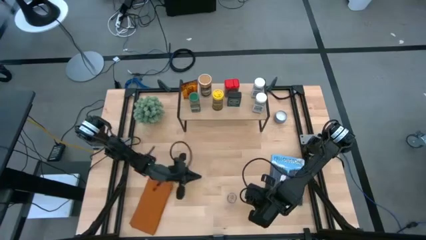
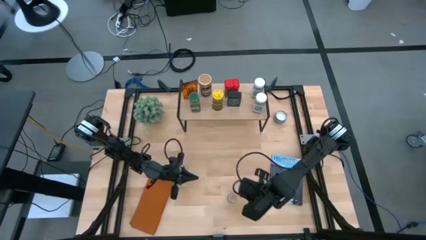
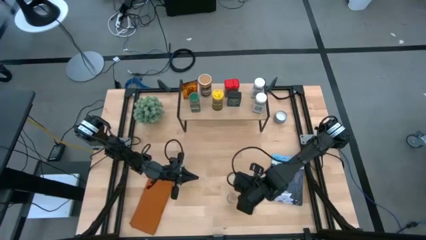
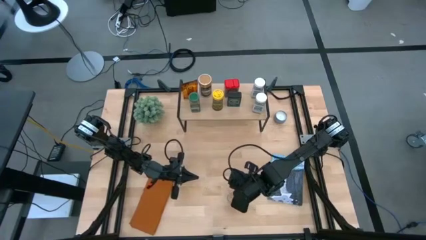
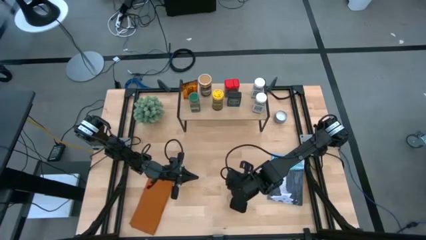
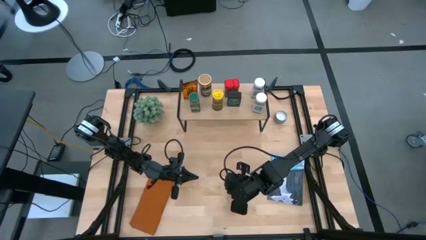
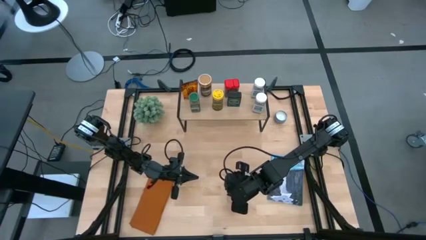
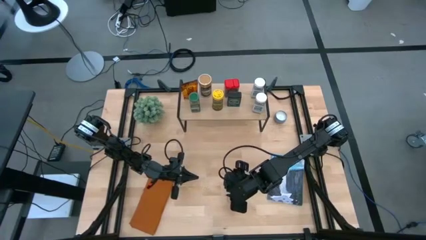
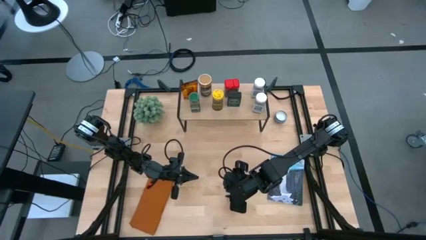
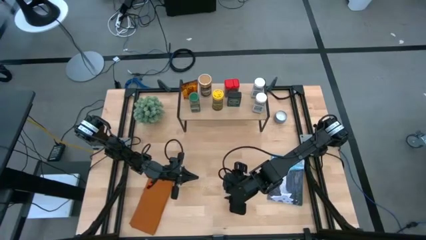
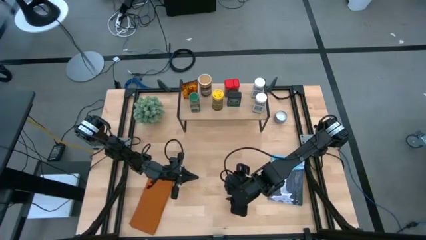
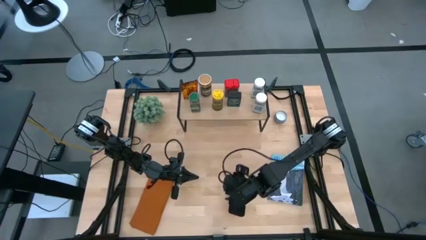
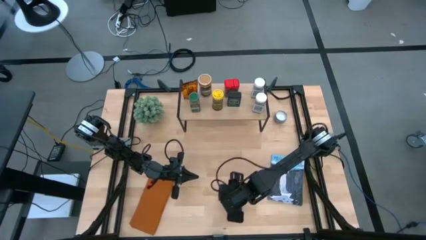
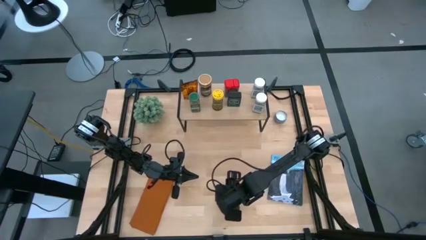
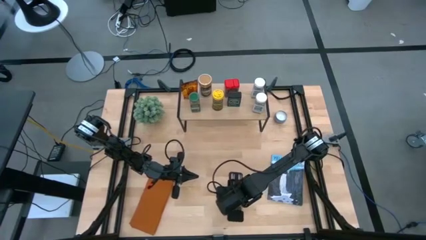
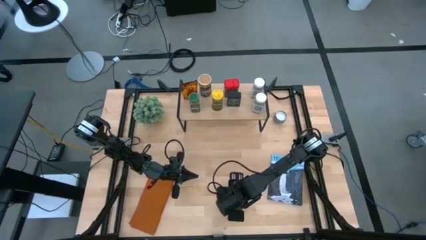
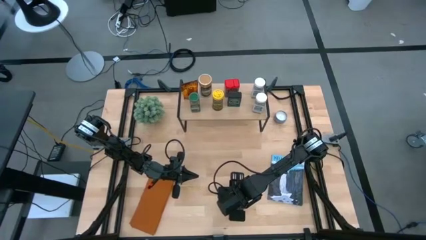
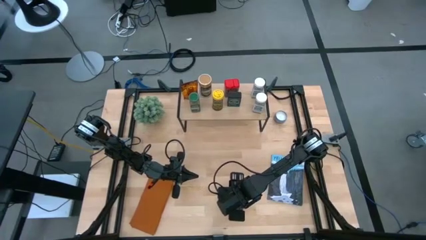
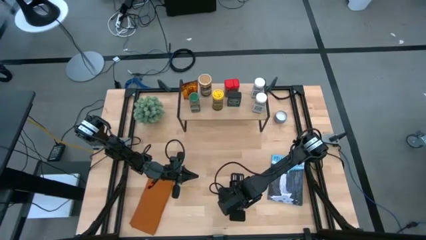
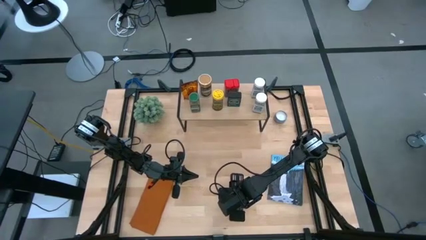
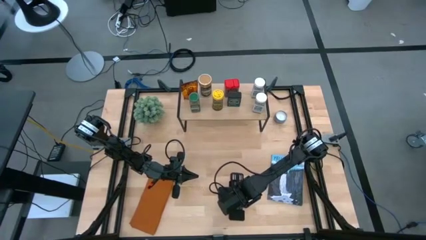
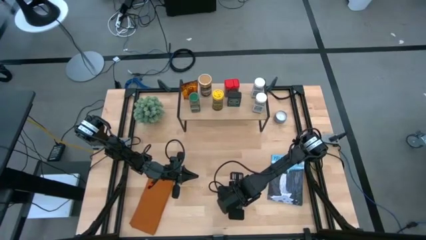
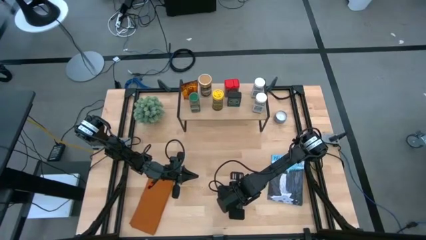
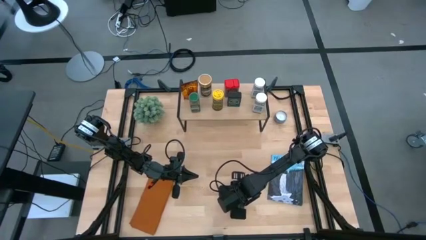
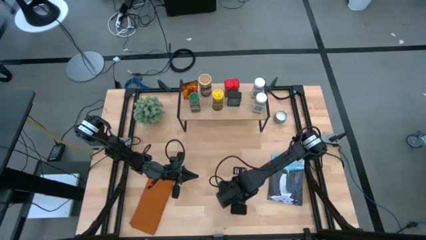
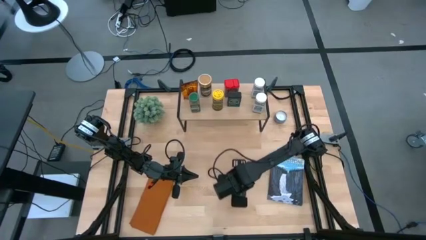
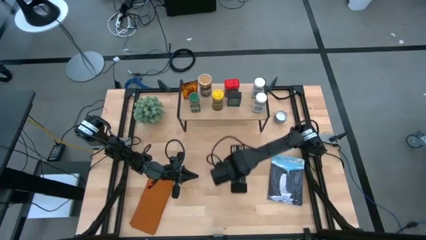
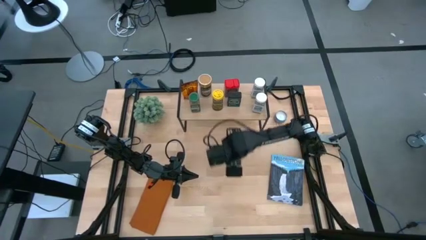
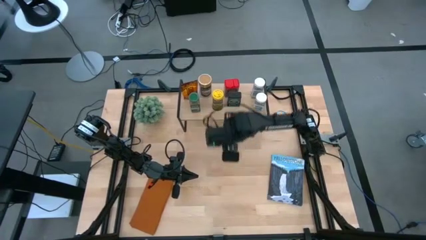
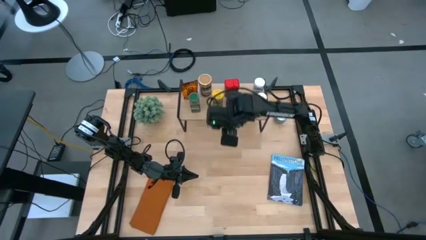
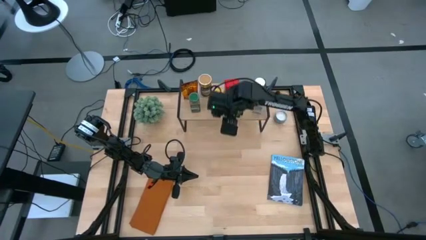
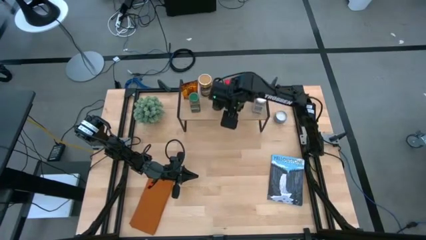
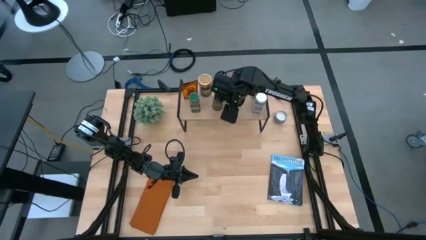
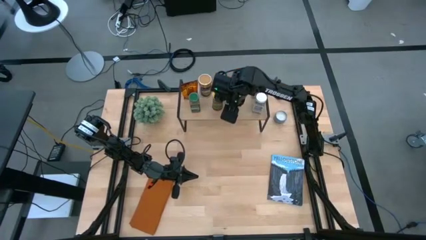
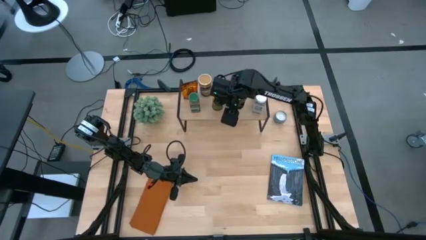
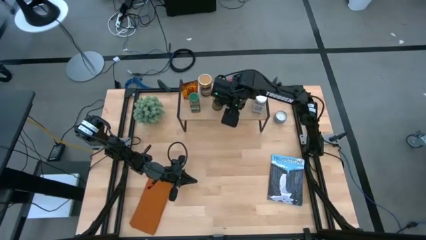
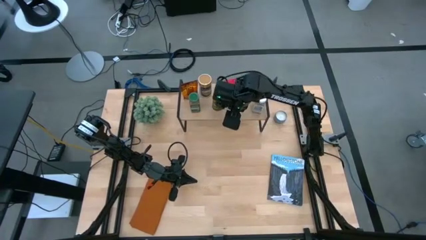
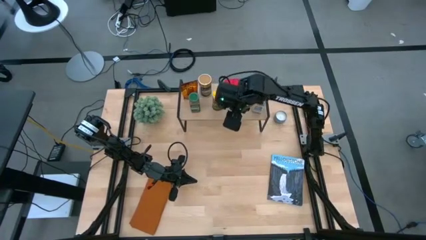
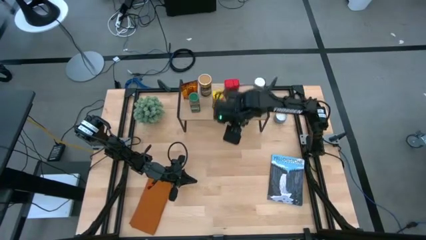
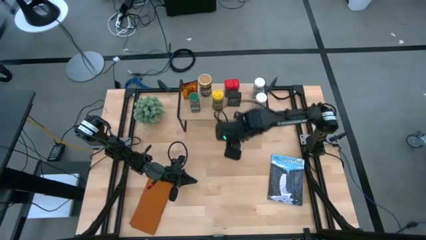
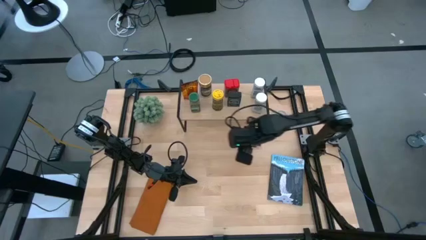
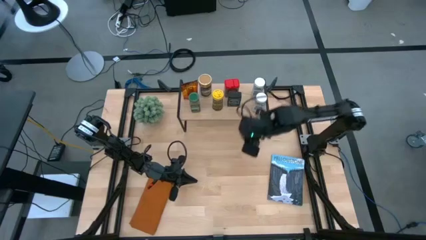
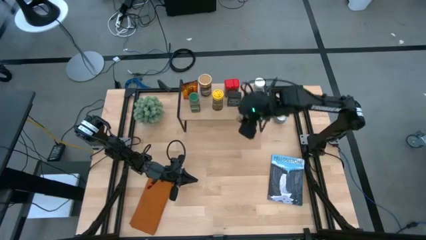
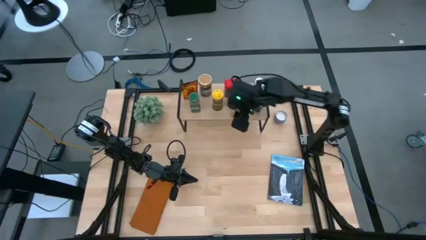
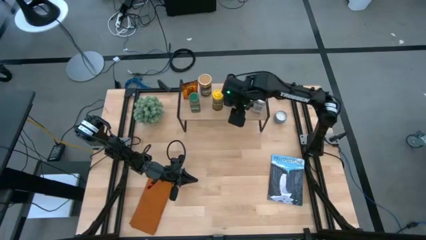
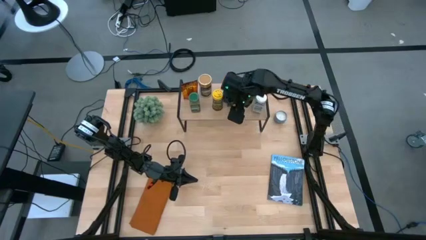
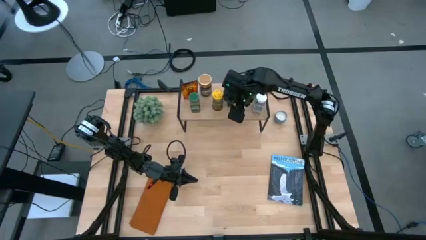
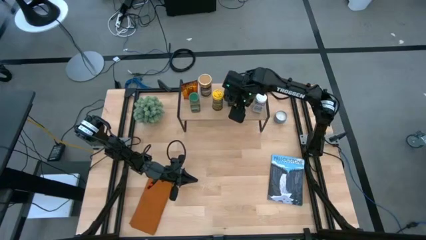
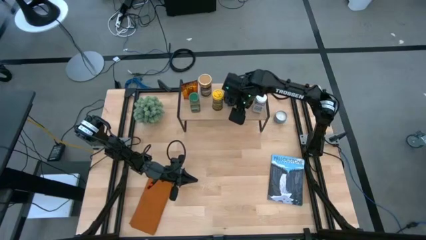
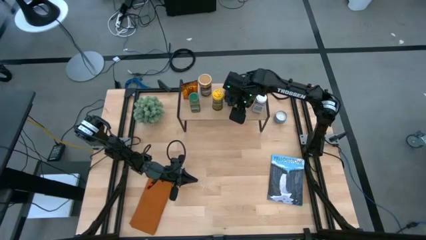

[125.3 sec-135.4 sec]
Task: Shelf spices
Put the brown seasoning bottle on the shelf
